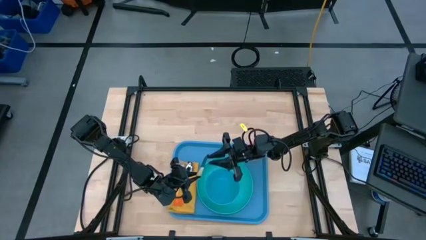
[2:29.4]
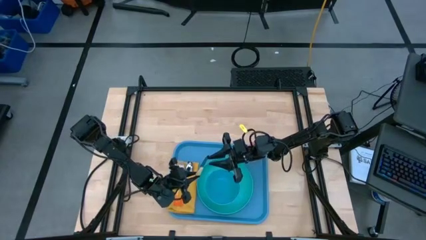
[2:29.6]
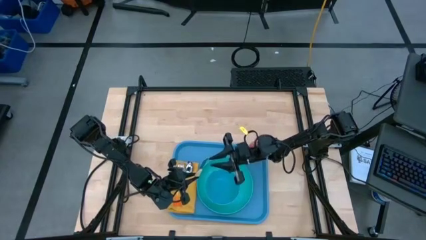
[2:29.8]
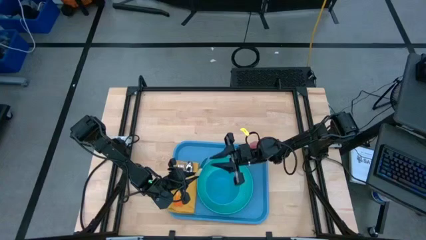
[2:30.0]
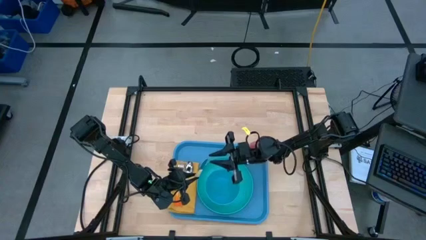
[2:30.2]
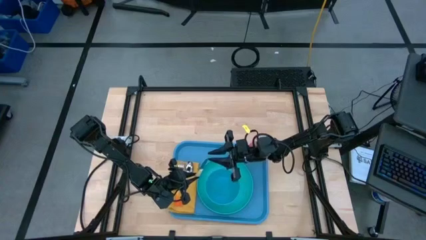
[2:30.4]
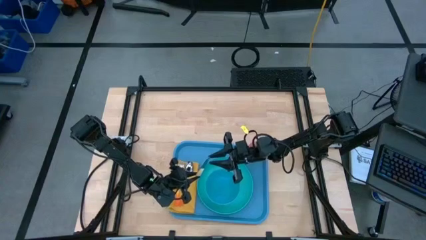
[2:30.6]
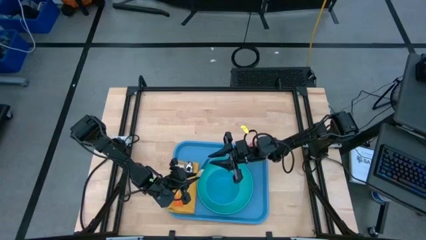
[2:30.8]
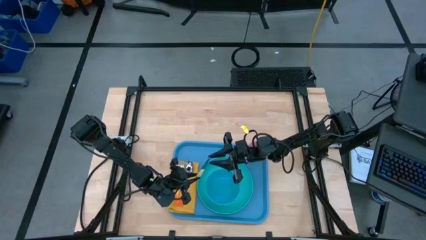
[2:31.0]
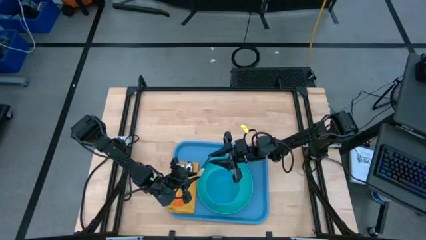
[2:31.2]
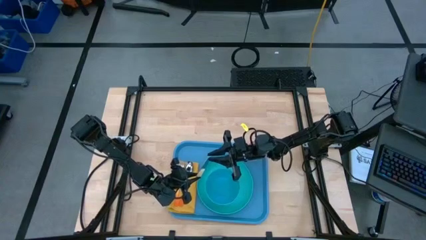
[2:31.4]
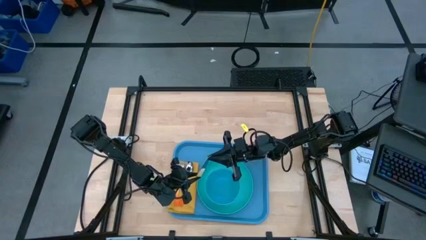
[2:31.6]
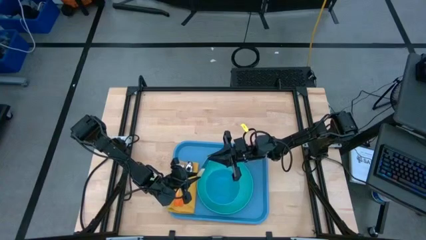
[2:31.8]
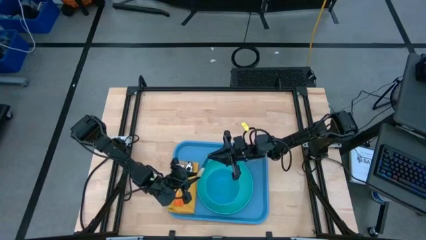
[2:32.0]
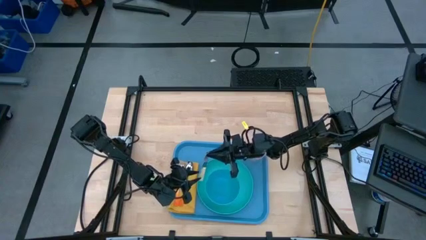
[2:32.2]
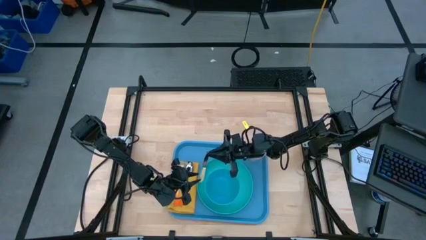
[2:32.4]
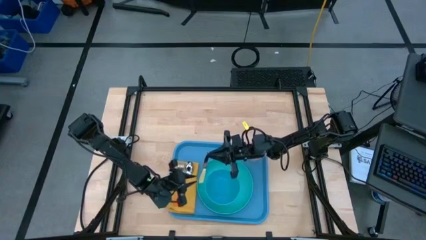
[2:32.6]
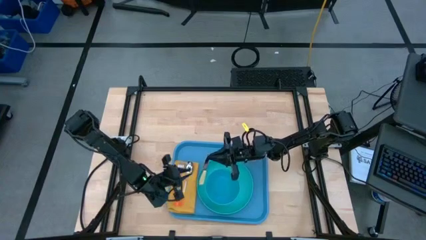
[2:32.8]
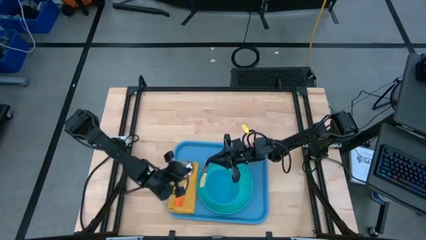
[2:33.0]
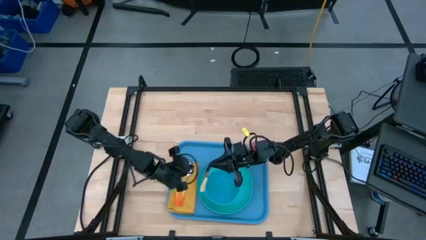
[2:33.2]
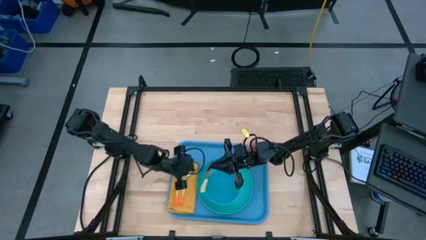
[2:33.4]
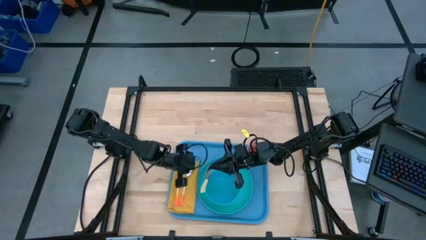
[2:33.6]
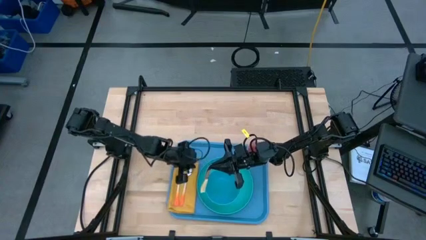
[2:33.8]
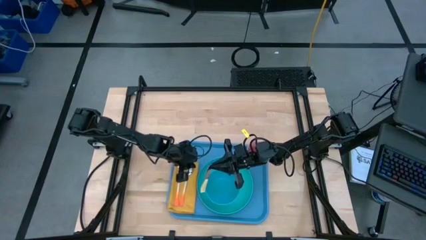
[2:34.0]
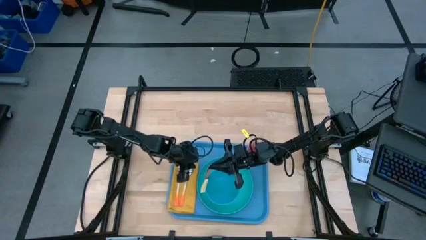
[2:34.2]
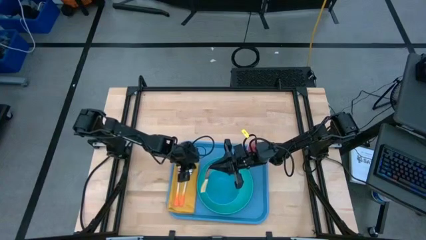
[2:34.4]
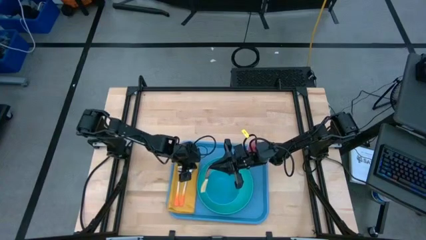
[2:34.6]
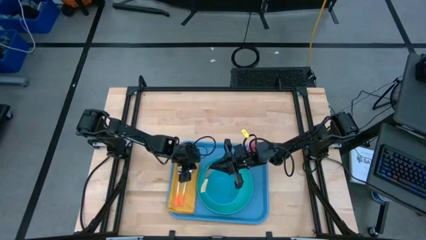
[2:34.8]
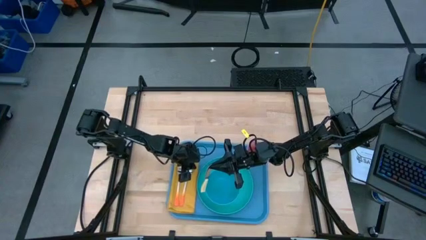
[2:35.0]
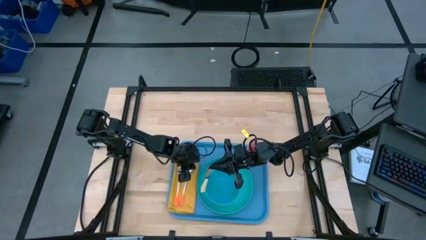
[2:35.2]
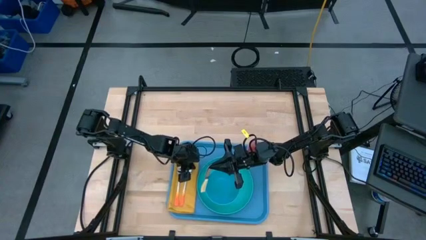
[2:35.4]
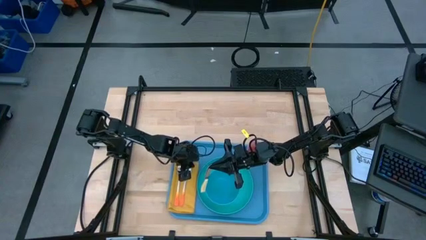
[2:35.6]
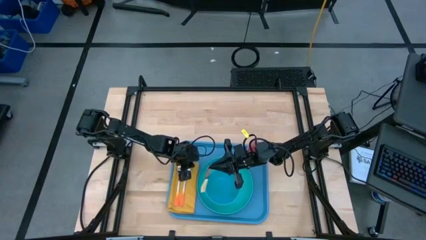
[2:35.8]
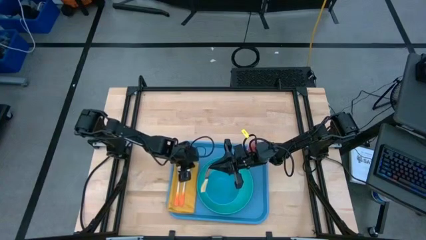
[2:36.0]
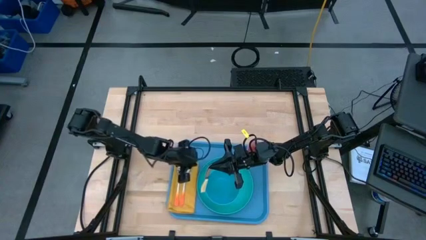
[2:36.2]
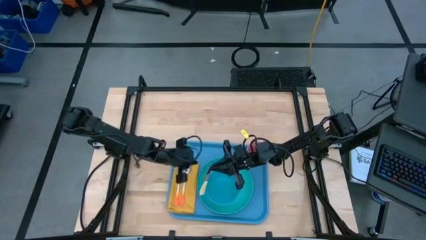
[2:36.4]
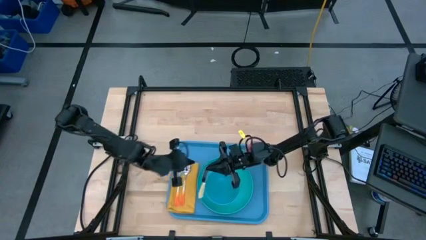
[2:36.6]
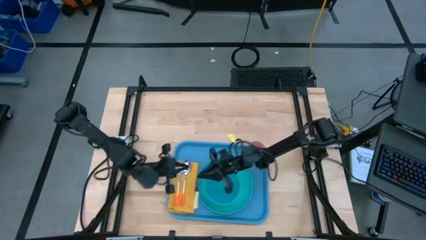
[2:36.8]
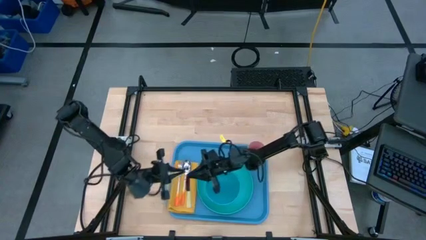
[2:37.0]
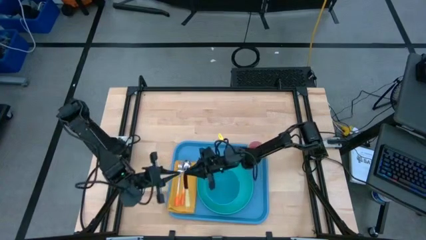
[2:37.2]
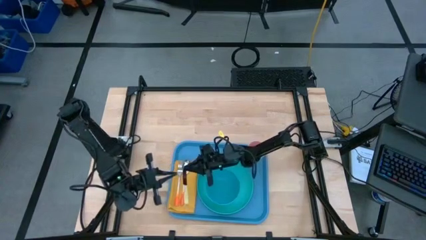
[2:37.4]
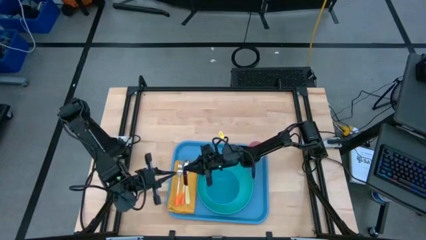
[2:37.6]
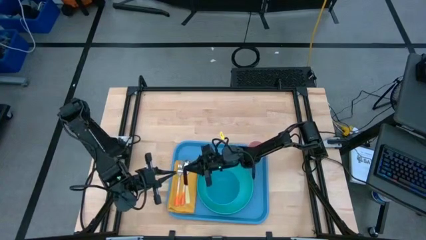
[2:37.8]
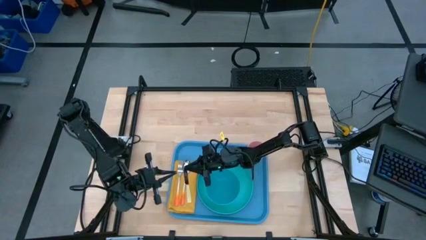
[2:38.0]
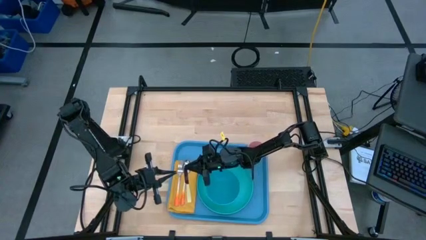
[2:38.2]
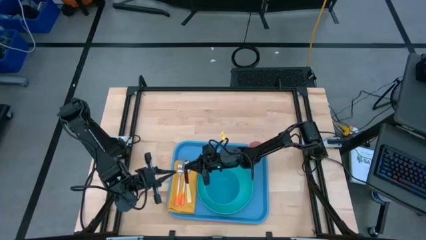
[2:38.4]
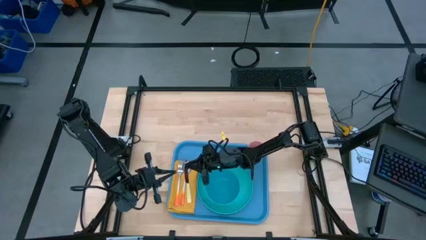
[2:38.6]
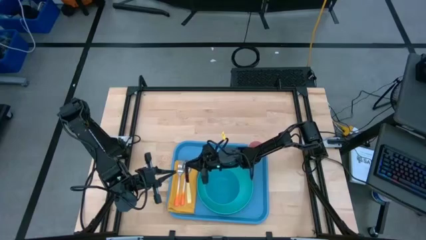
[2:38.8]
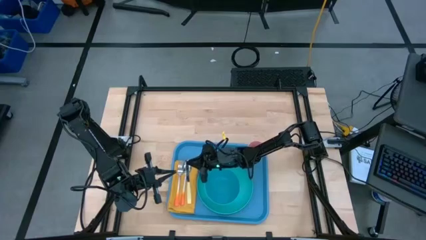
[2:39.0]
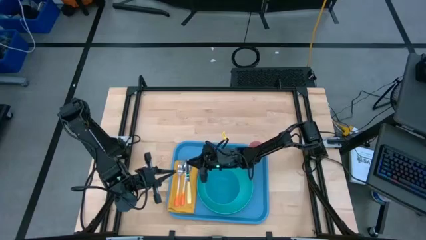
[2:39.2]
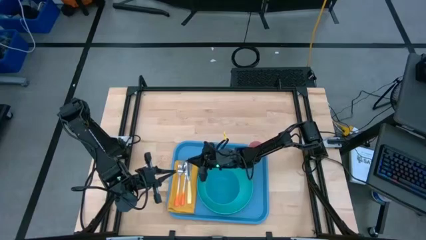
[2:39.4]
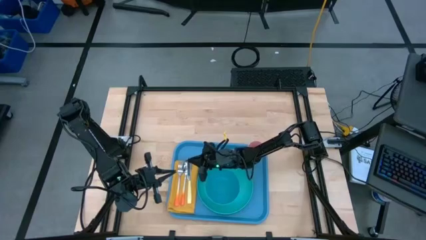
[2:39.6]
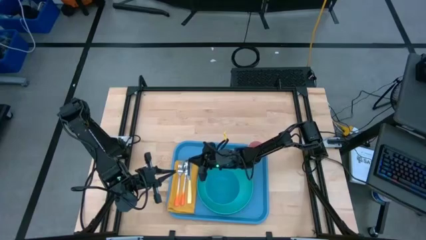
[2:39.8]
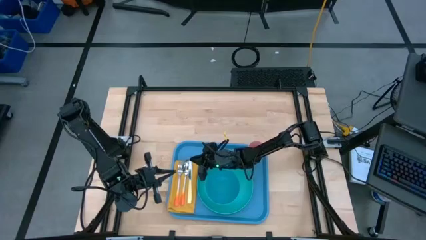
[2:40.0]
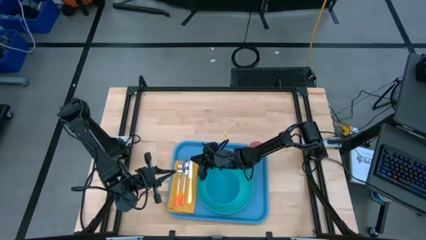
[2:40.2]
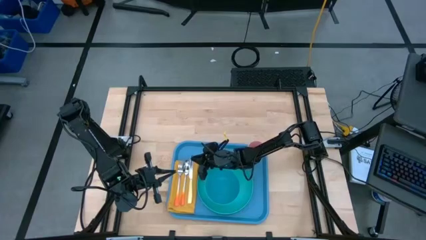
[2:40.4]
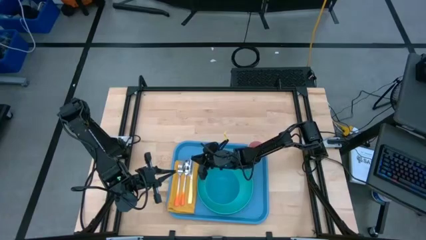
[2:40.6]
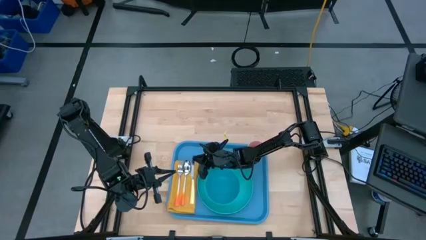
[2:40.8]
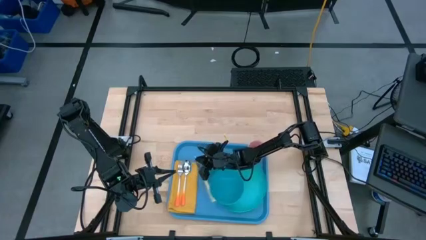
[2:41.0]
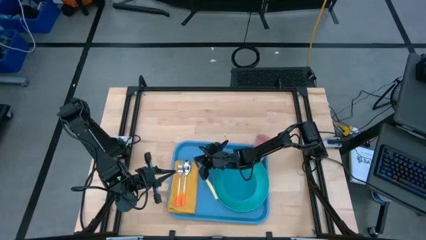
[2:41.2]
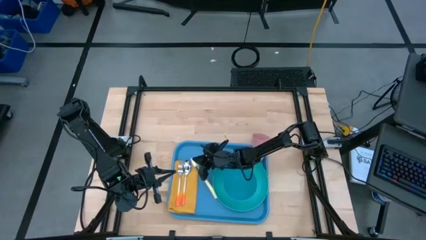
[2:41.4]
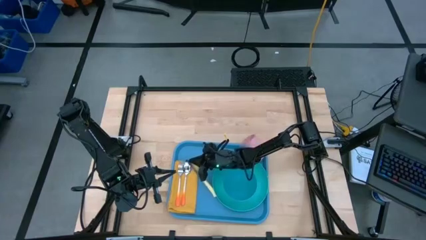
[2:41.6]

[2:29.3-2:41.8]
Task: Set up tray
Put the yellow table knife on top of the yellow table napkin to the right of the orange spoon
